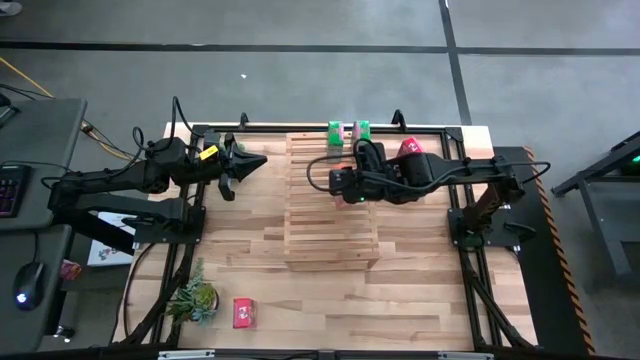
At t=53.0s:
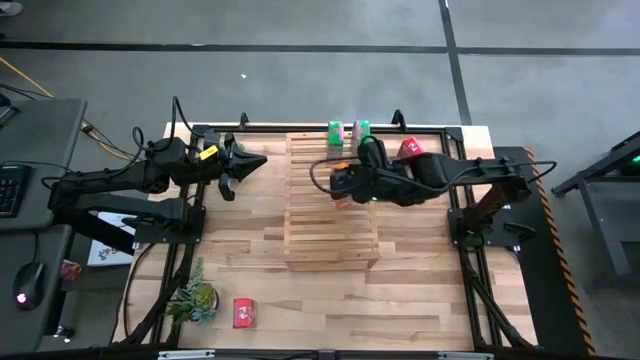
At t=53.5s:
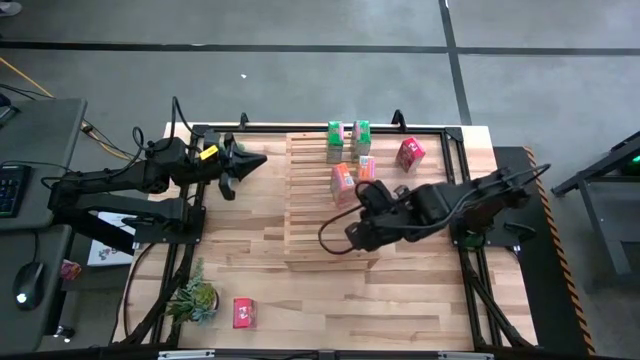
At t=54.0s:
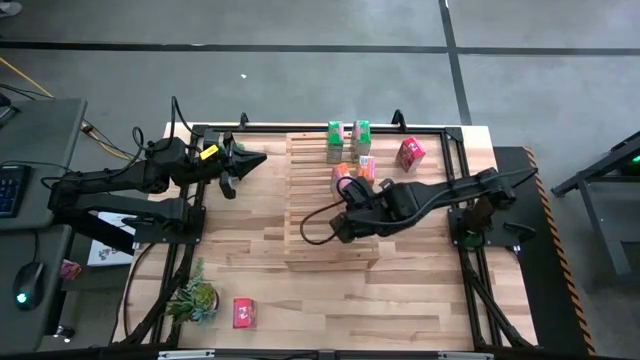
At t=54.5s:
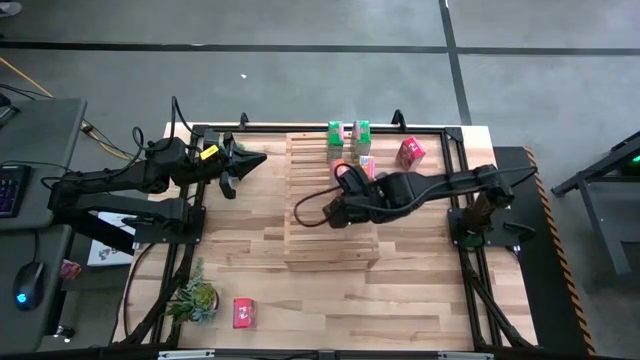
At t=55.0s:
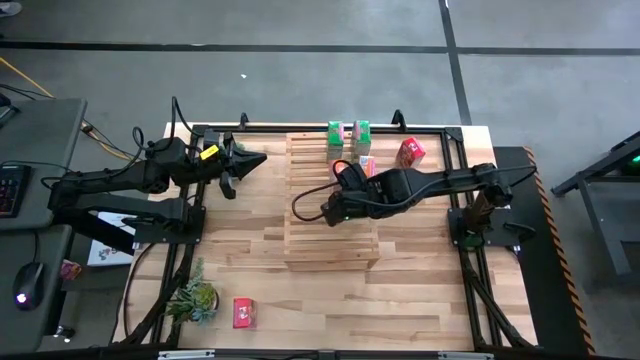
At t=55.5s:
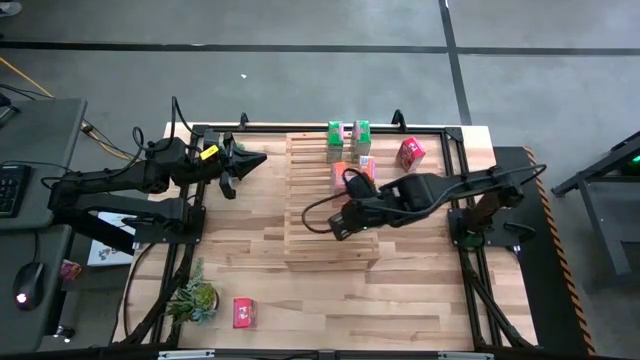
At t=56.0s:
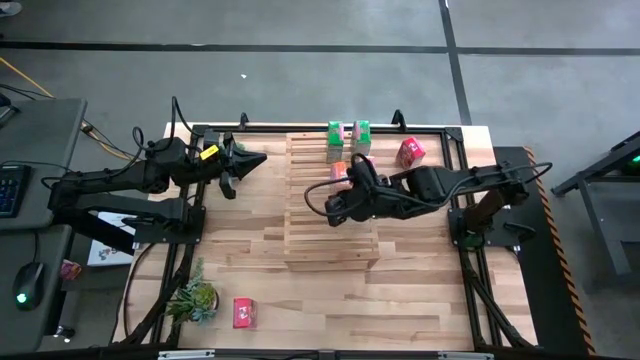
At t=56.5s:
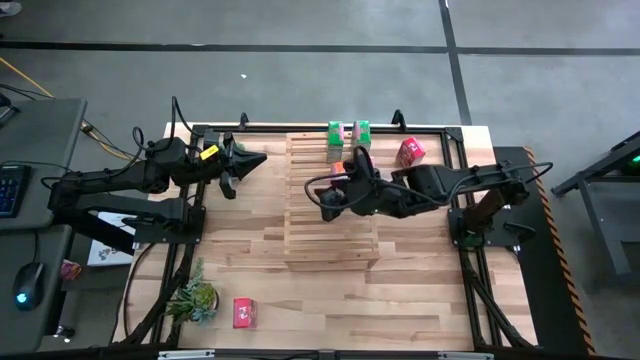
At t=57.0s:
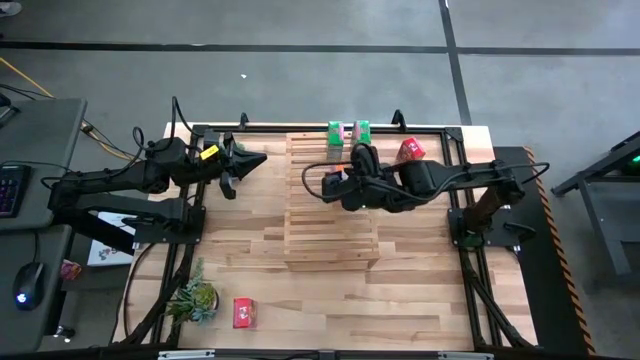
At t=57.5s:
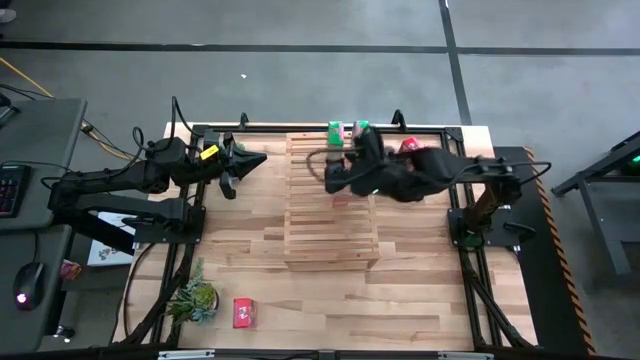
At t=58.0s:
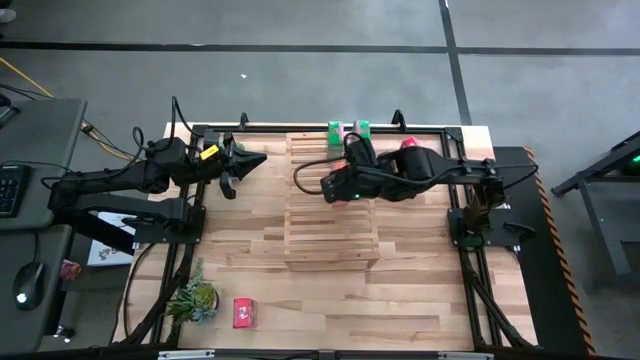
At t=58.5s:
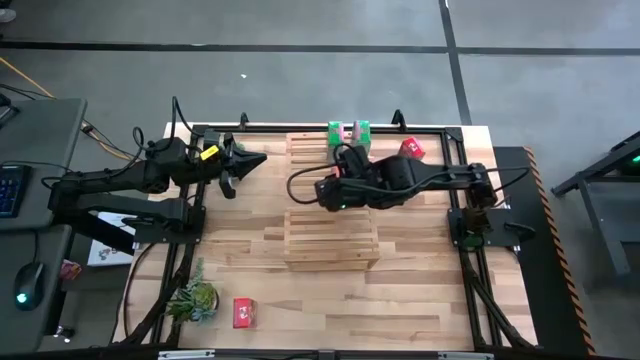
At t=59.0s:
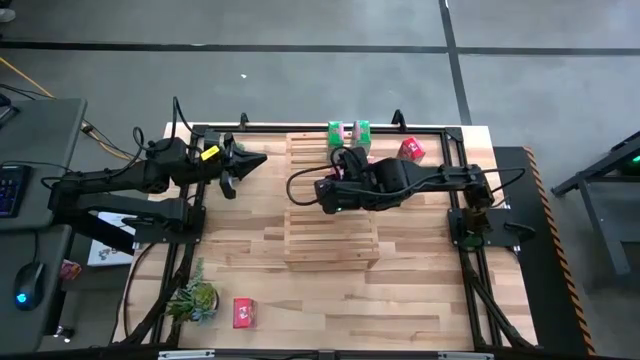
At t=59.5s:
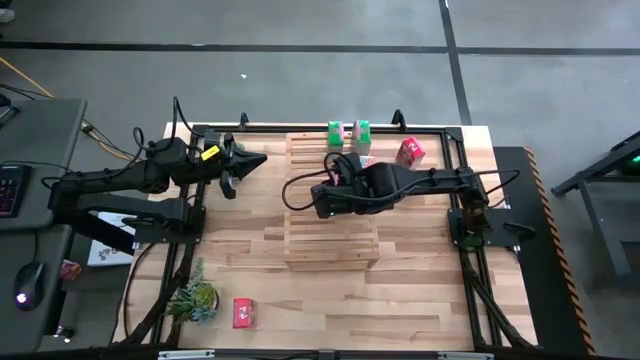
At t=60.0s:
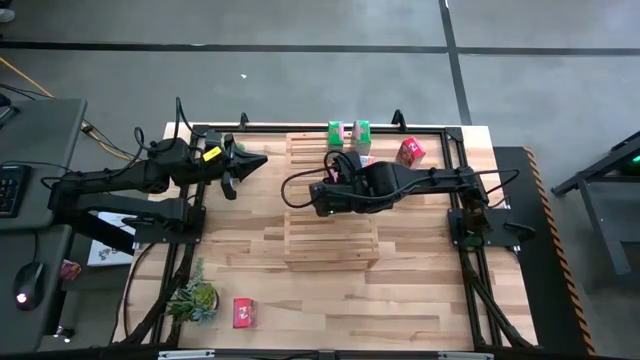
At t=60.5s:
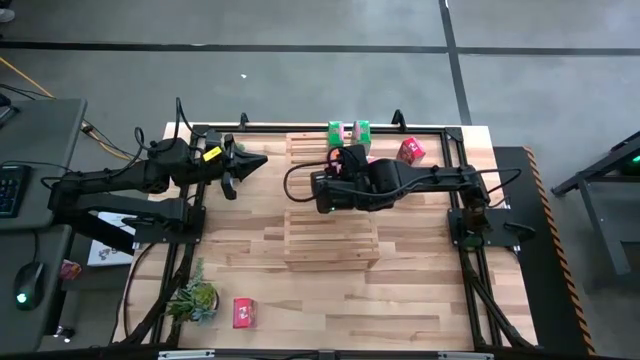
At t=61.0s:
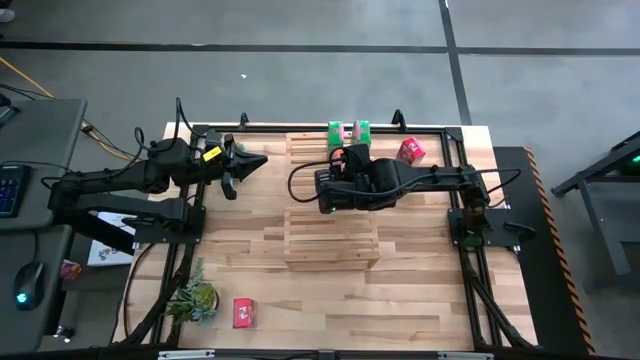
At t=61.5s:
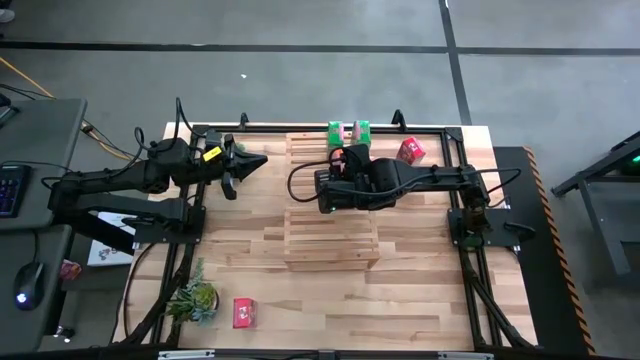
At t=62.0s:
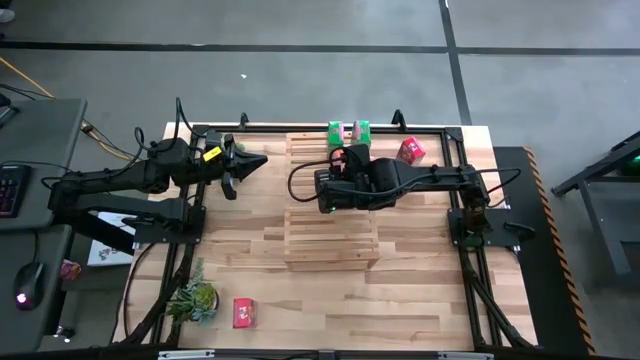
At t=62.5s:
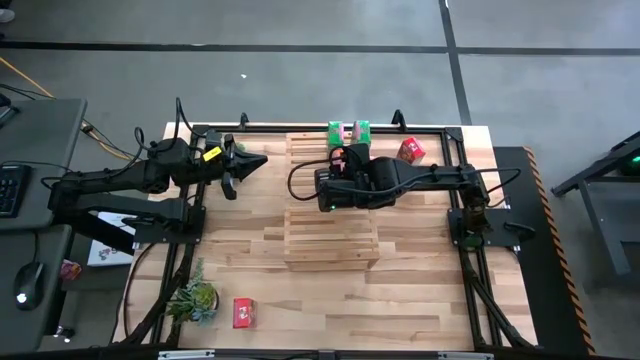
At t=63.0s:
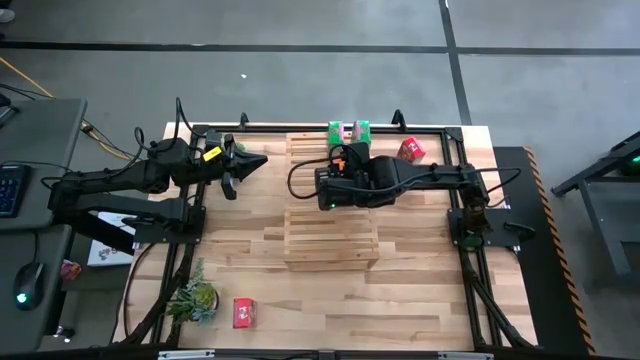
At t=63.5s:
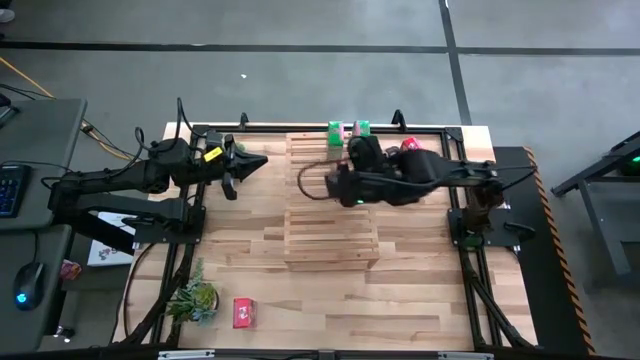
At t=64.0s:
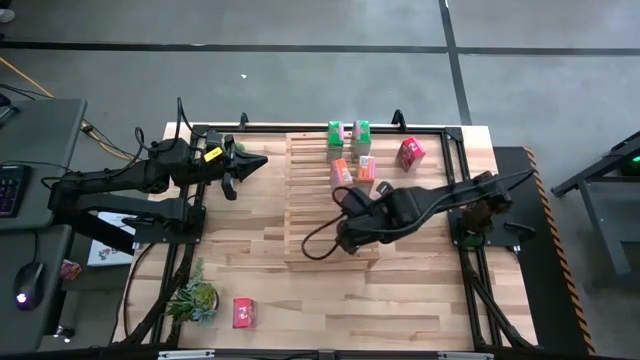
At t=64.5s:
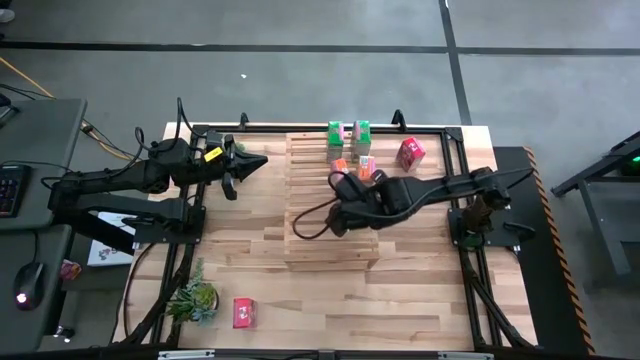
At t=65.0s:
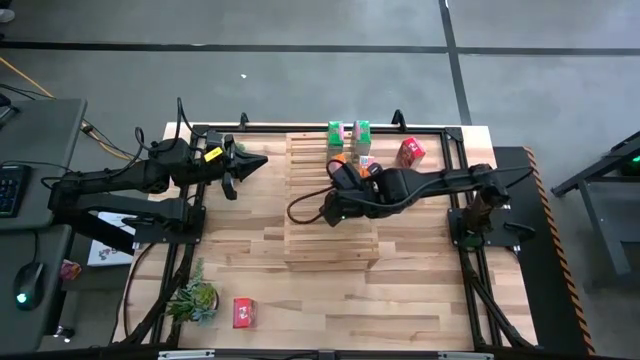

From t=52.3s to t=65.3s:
Task: Stack cereal on shelf
Put the orange cereal box on the shelf

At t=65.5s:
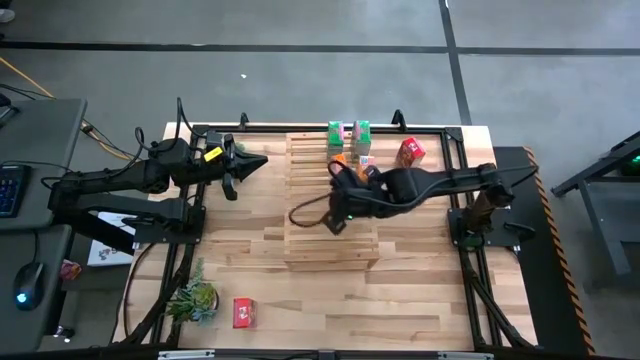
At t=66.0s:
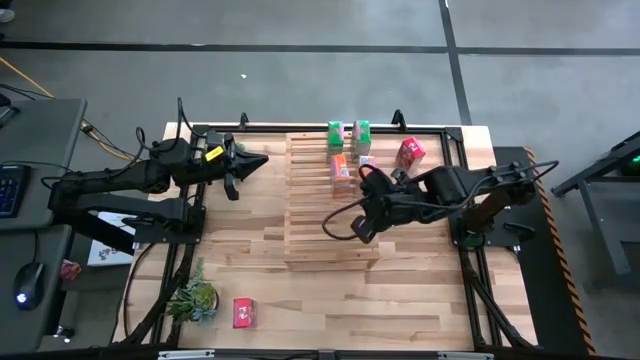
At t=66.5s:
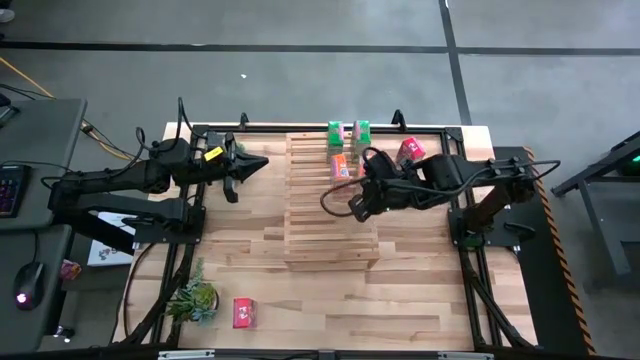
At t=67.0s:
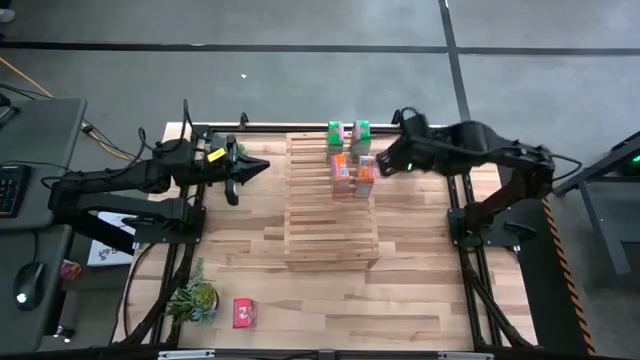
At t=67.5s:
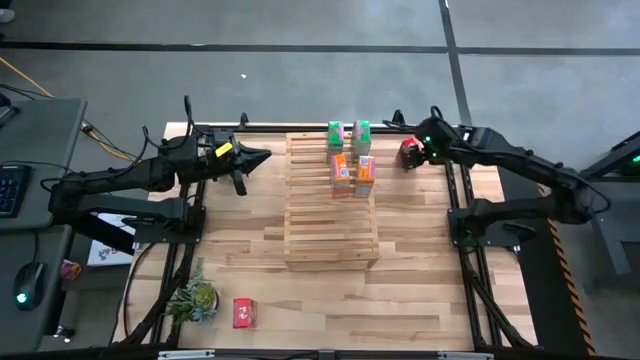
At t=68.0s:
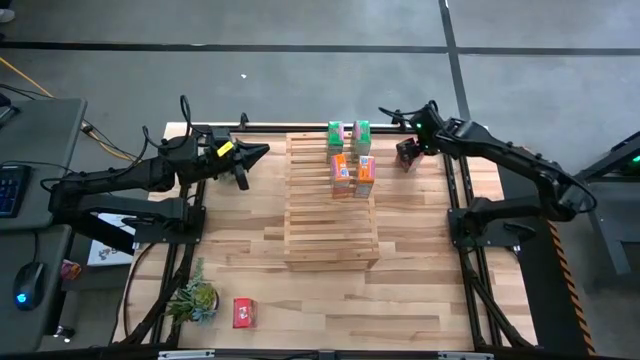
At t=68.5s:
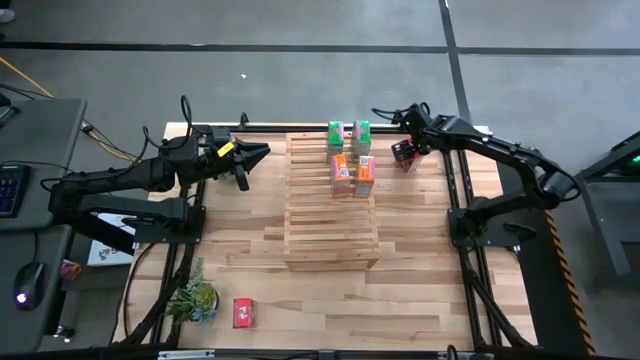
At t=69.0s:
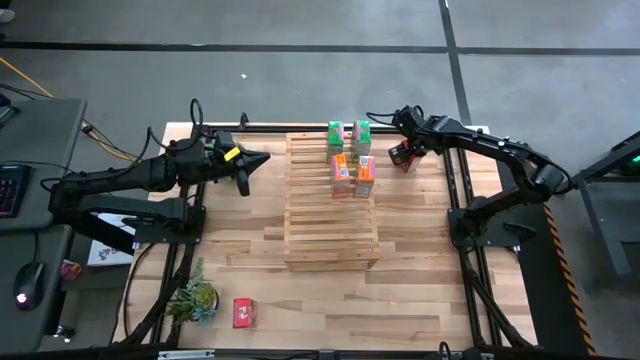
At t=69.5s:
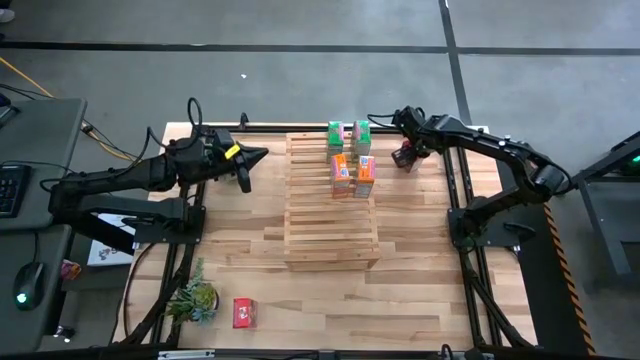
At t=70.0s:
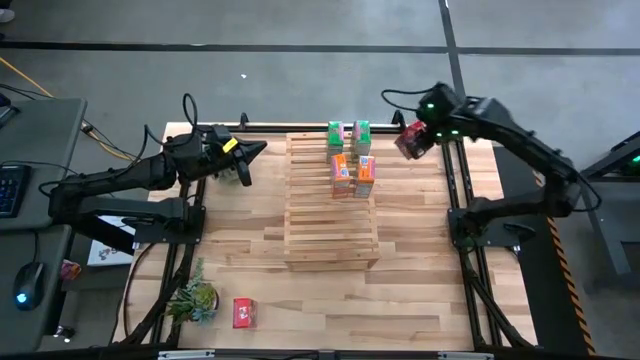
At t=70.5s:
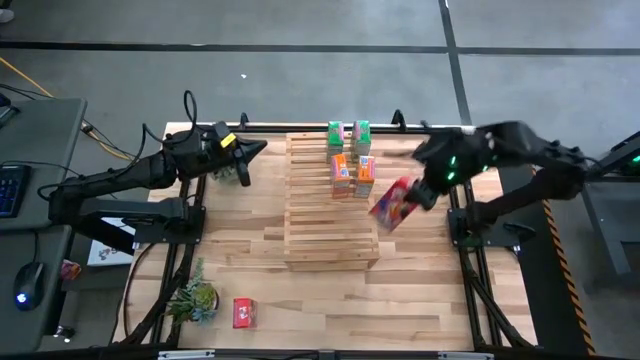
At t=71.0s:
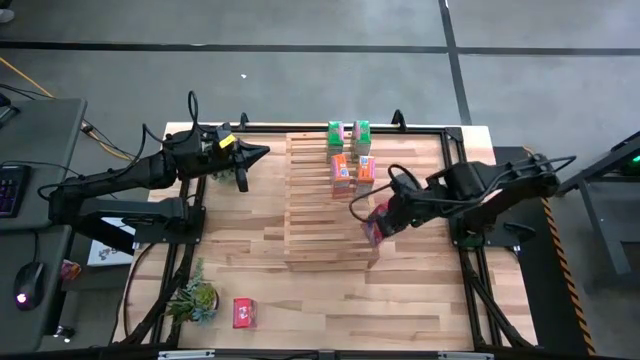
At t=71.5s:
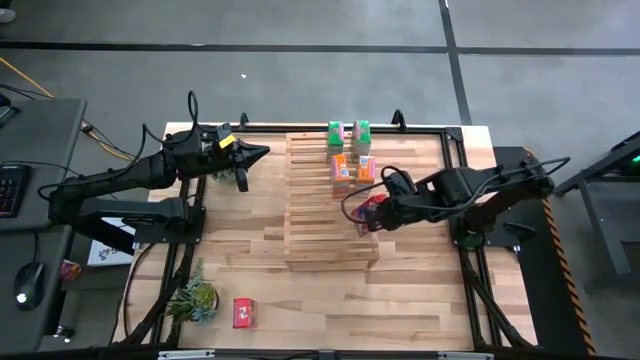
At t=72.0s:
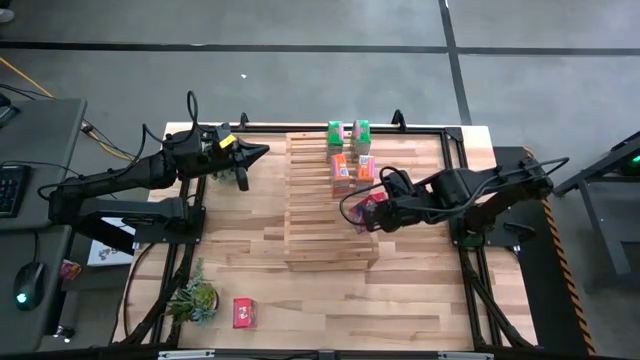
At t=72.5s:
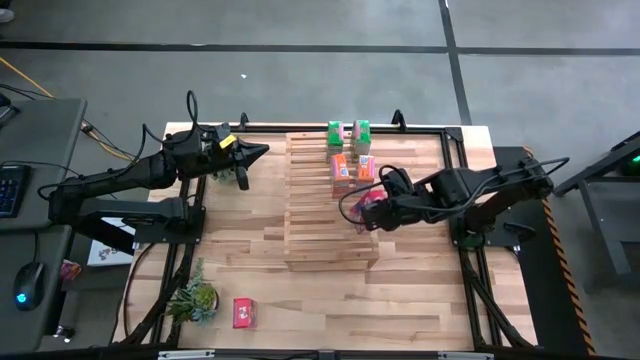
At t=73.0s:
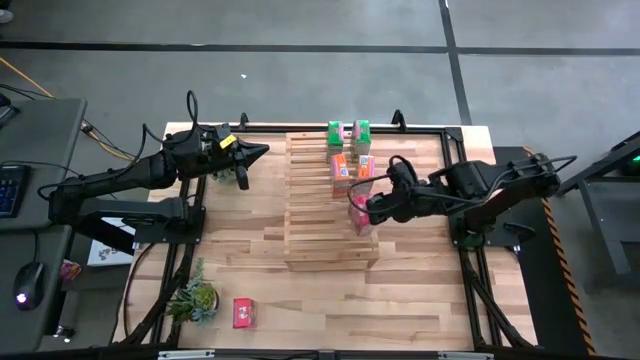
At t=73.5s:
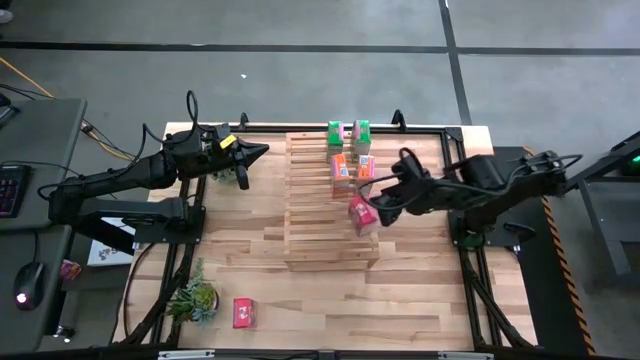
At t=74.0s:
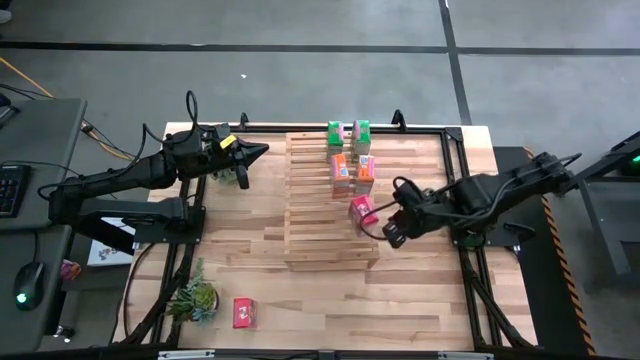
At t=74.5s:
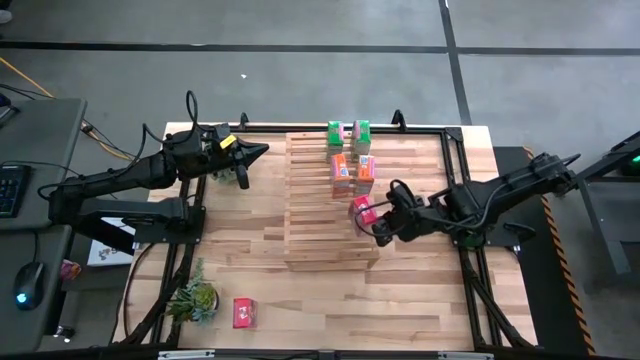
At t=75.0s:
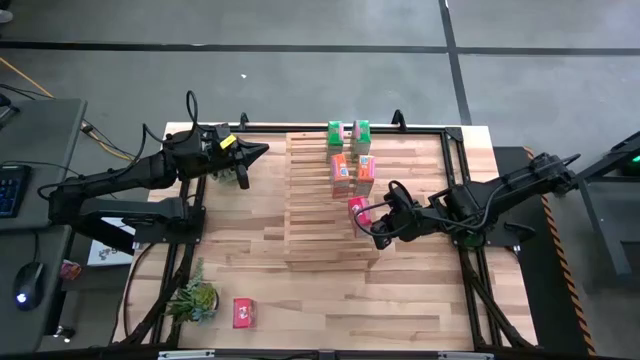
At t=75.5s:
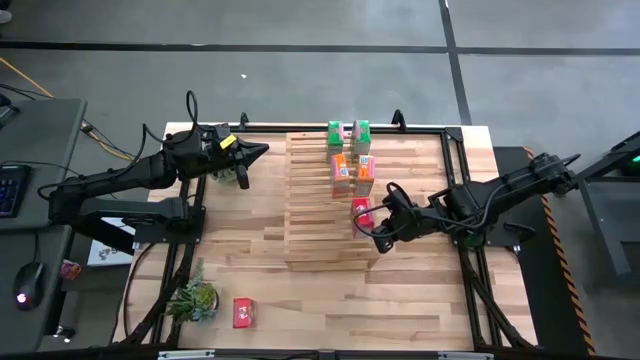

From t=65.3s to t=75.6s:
Put the top red cereal box on the shelf
